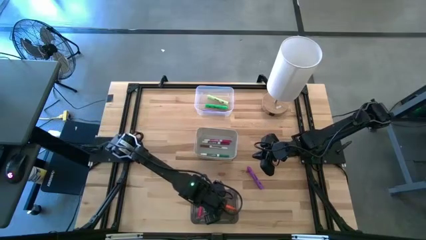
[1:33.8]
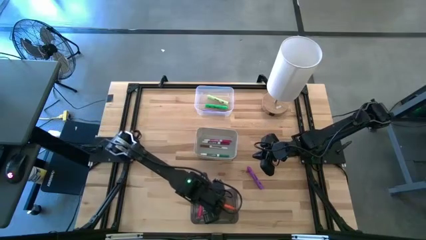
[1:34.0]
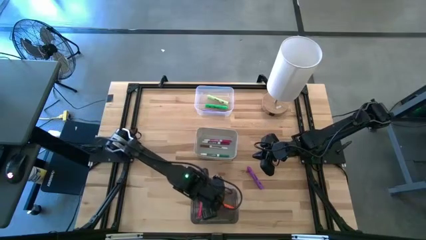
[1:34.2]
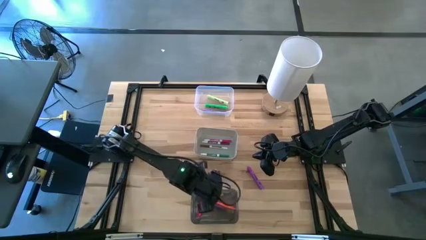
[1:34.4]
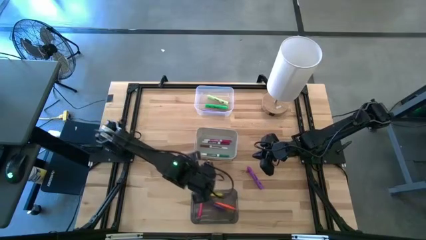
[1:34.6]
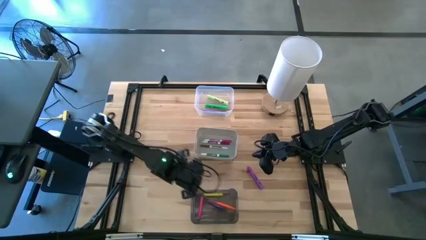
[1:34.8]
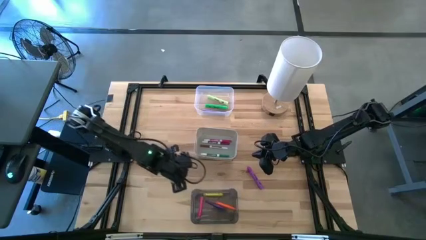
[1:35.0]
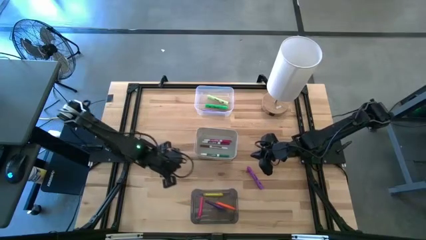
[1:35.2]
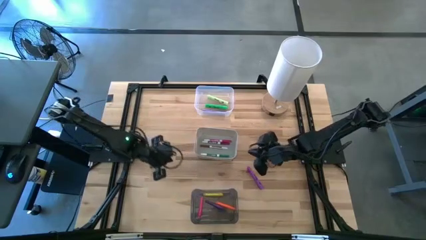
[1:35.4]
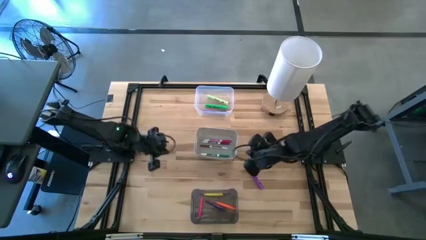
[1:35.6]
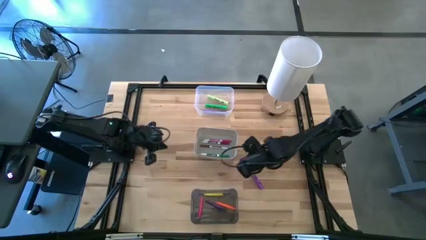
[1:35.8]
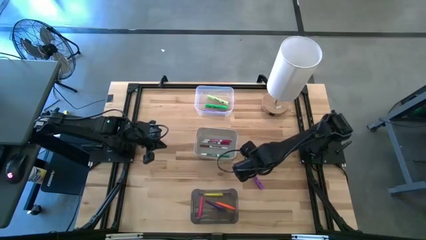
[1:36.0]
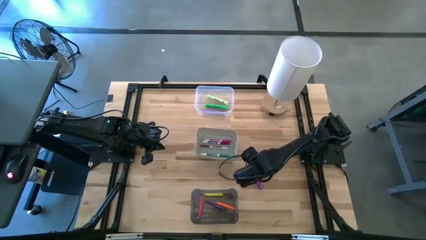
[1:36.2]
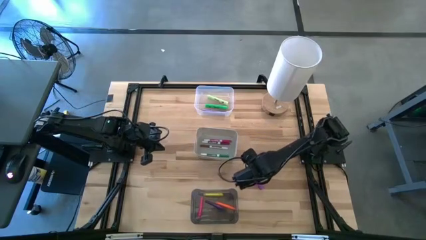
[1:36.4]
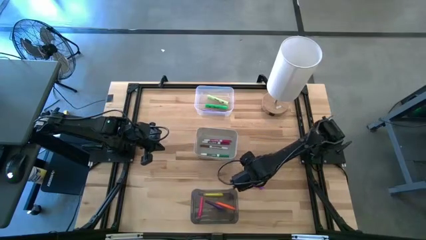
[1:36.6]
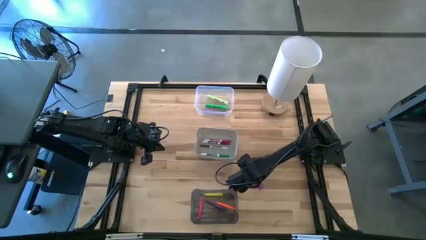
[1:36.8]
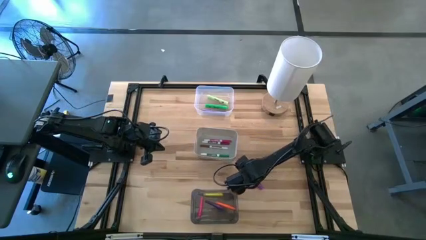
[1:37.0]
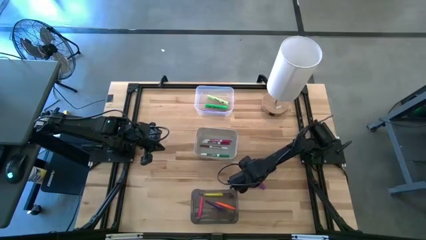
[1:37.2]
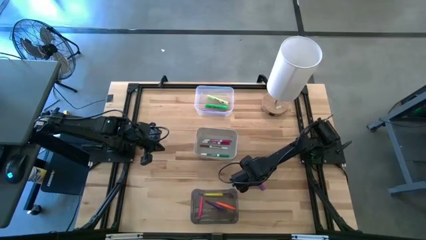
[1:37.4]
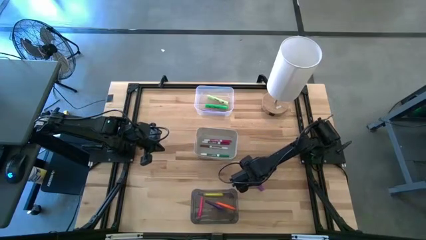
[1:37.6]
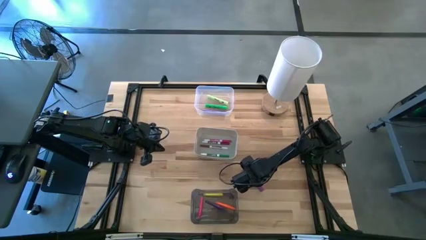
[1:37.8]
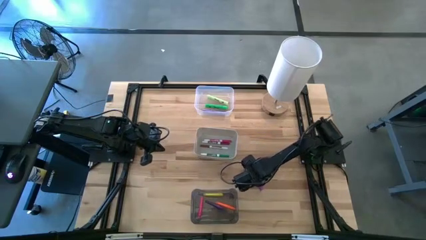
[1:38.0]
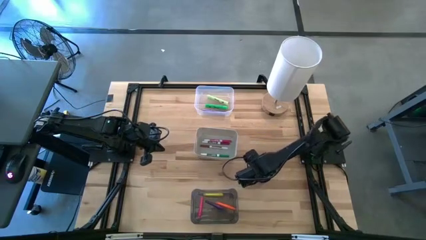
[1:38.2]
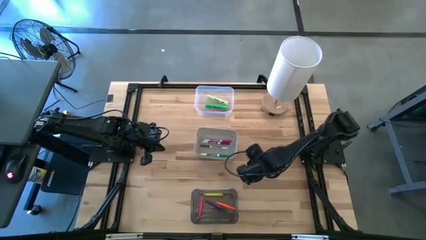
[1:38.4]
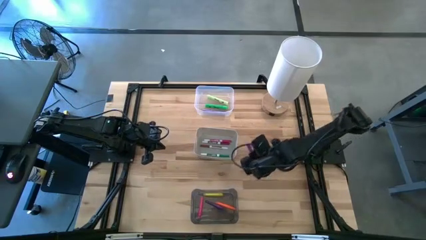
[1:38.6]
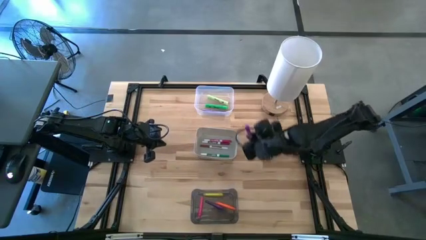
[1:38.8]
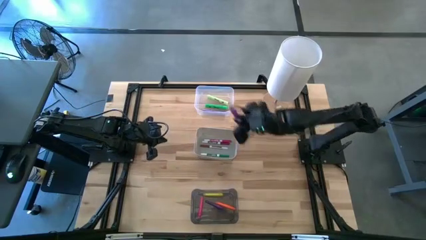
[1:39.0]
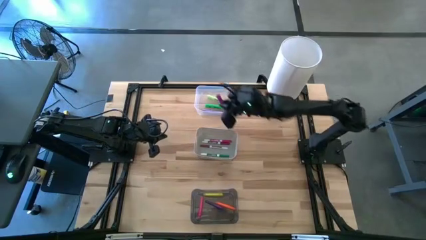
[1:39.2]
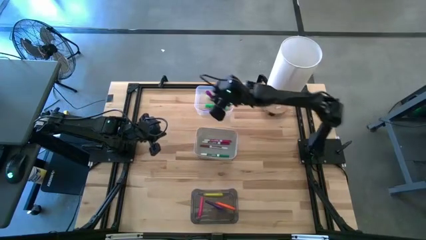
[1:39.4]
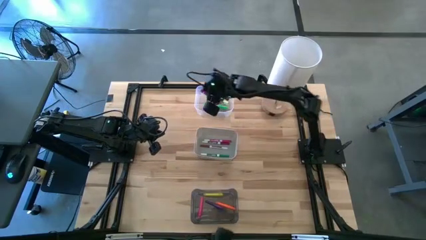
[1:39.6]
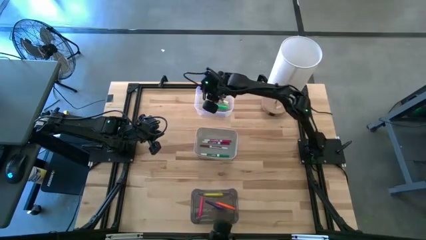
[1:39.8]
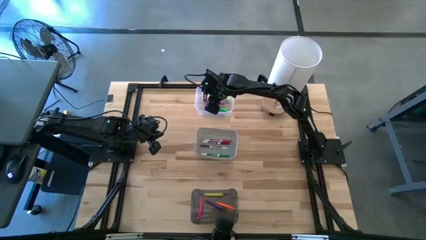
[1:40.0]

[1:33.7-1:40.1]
Task: Pick & Place Markers
Put the violet highlighter into the transparent bin

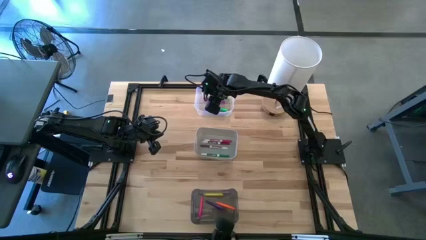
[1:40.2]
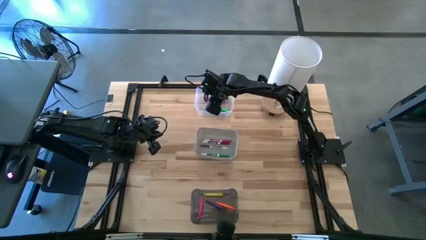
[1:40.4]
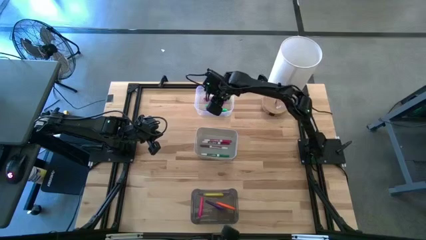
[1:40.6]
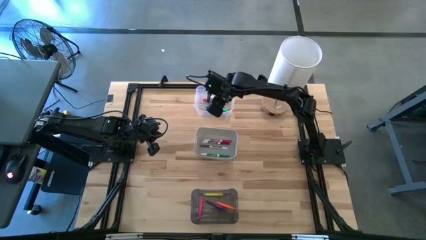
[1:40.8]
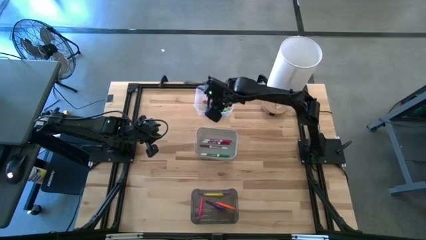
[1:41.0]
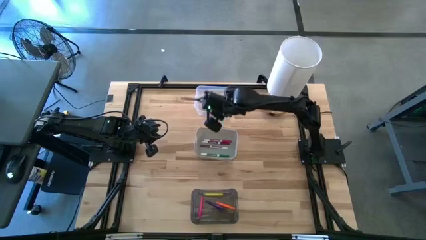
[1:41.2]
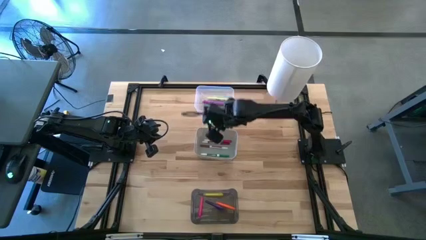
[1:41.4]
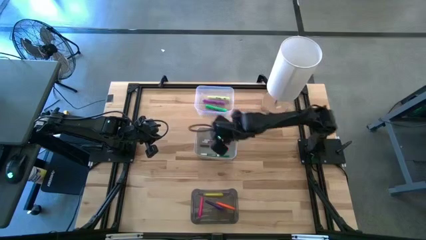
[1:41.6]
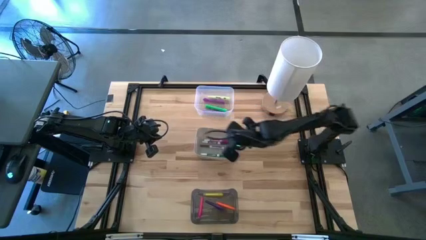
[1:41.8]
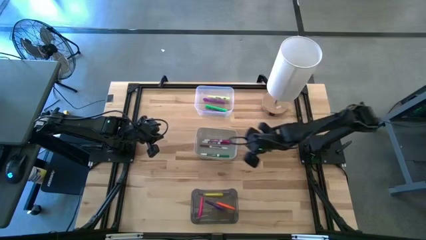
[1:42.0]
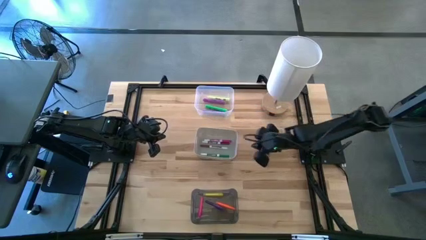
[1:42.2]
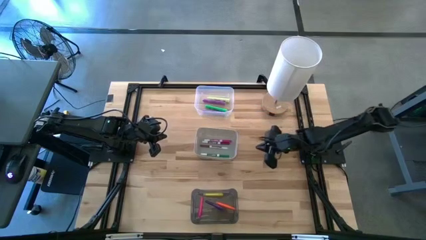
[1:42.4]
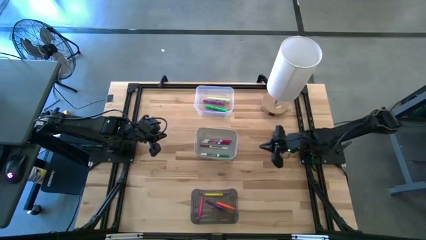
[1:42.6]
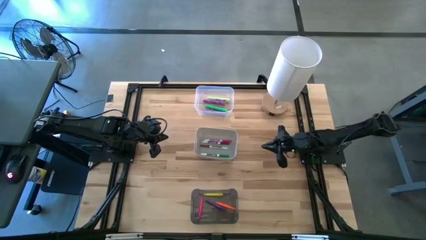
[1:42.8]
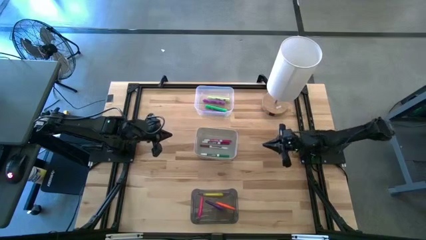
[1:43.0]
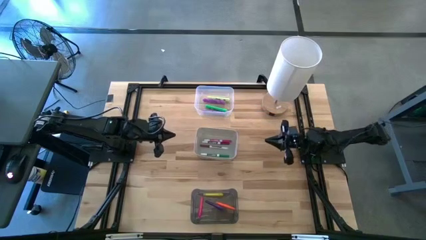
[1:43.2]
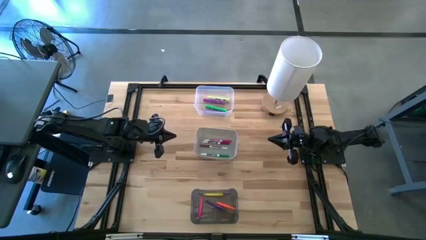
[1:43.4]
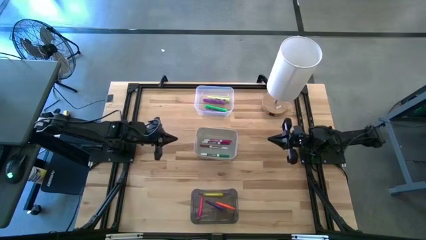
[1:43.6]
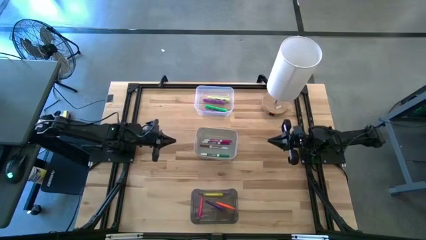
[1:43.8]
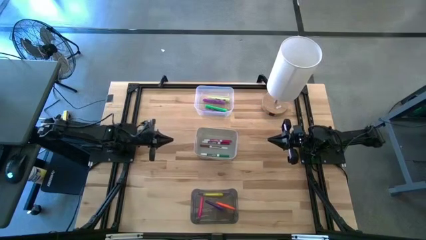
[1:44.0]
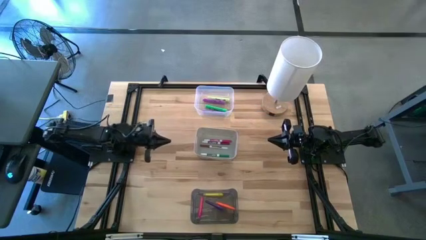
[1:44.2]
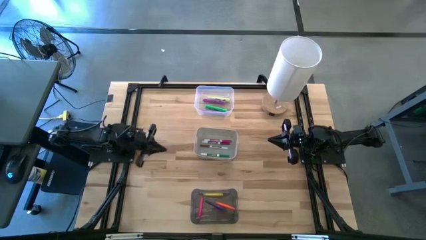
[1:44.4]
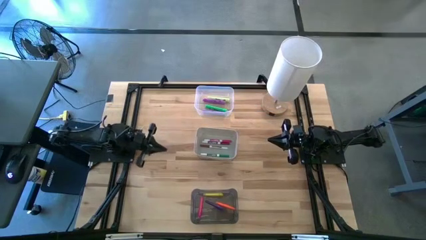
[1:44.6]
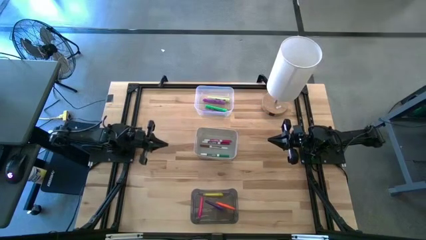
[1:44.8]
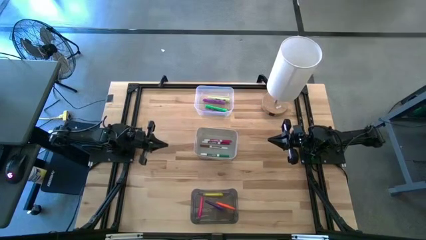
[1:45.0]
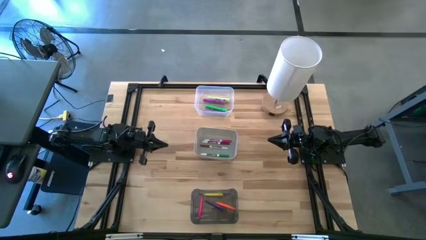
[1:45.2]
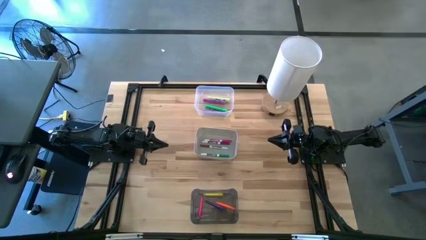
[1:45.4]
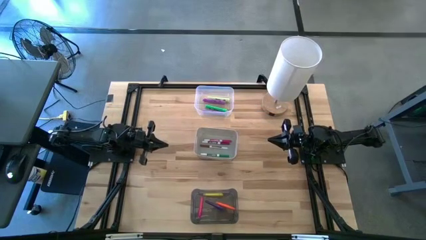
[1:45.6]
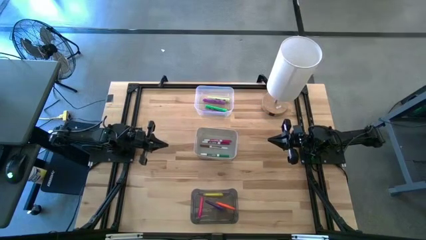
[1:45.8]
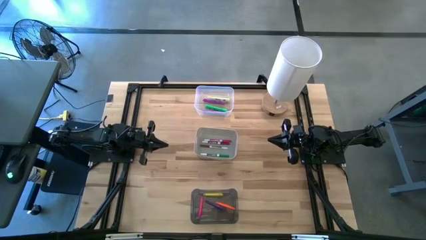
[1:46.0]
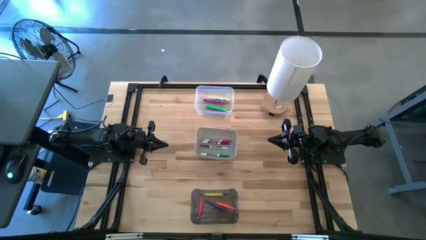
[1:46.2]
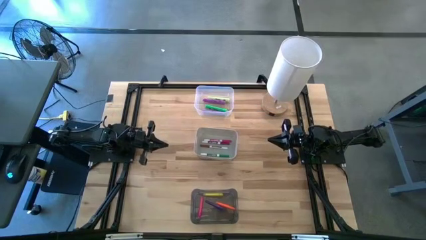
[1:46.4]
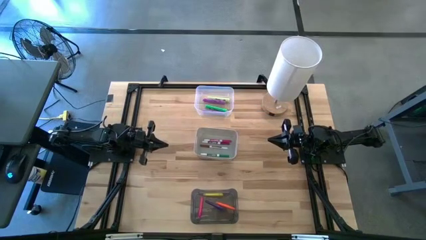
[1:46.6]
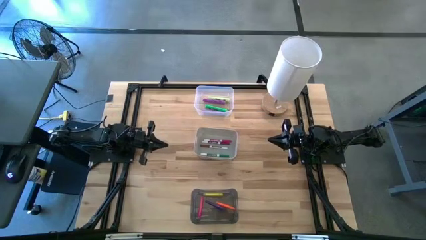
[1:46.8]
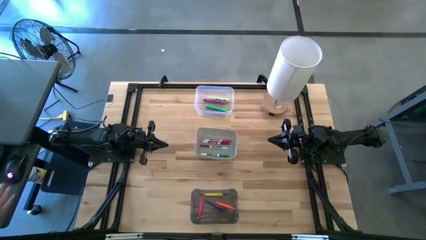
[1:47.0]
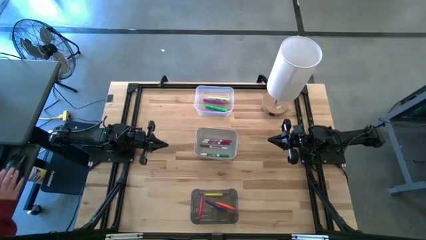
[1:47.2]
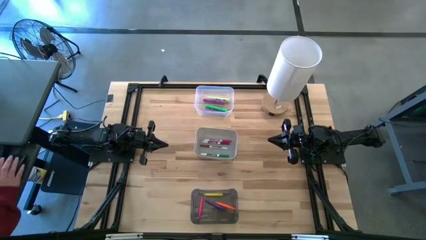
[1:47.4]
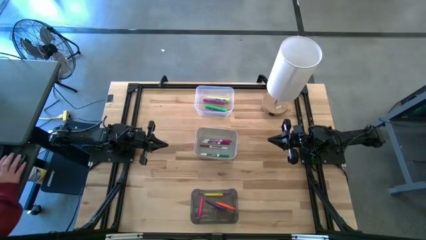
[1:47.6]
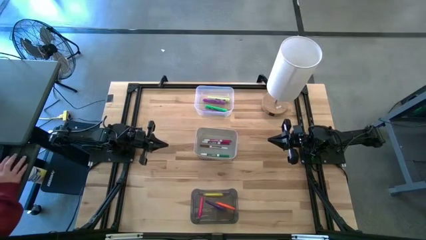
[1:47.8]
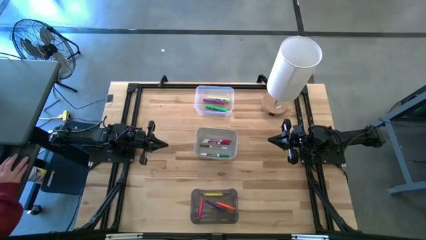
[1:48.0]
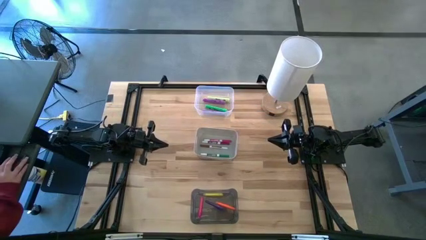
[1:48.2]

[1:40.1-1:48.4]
Return to Home Position

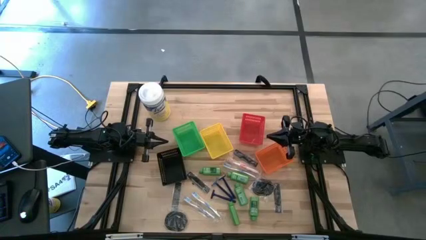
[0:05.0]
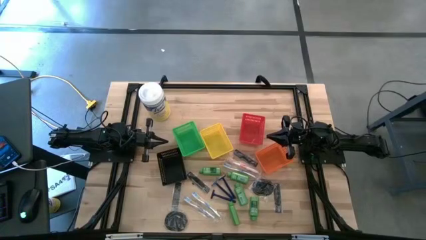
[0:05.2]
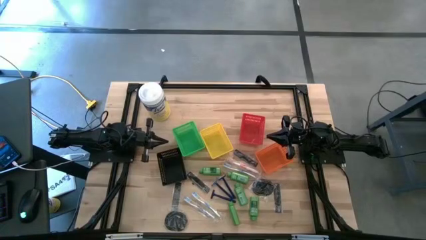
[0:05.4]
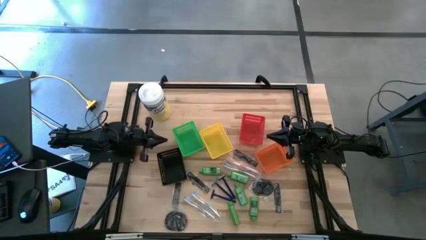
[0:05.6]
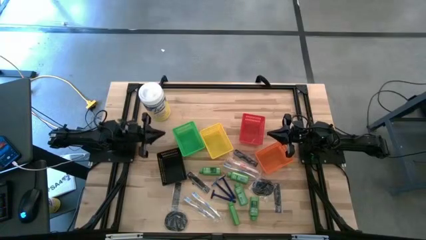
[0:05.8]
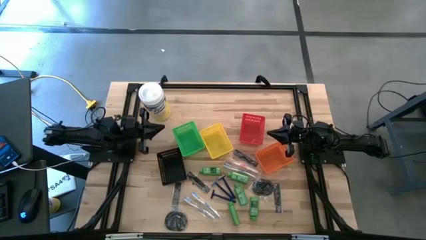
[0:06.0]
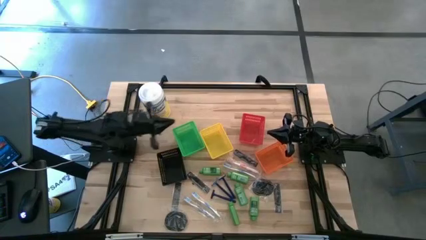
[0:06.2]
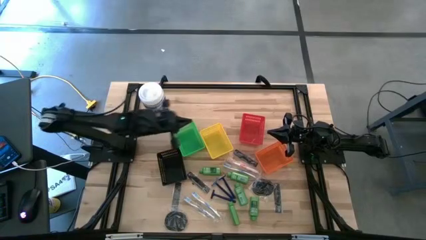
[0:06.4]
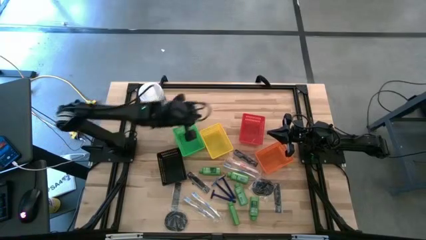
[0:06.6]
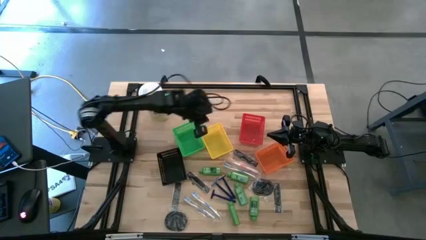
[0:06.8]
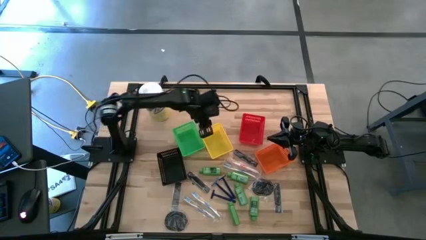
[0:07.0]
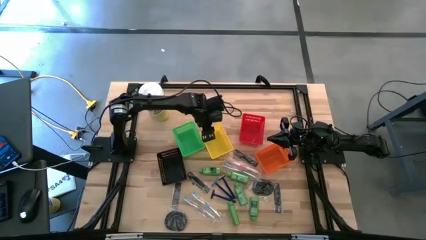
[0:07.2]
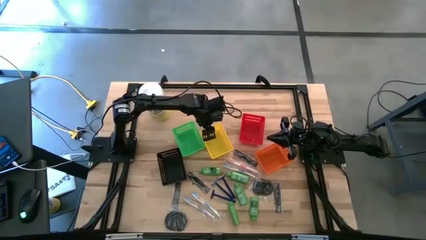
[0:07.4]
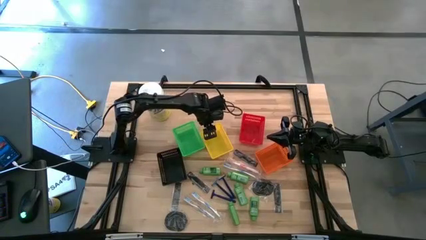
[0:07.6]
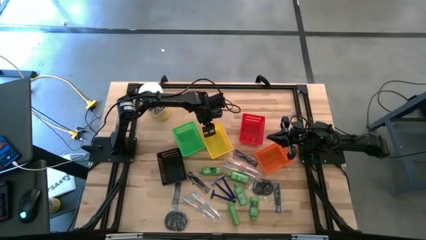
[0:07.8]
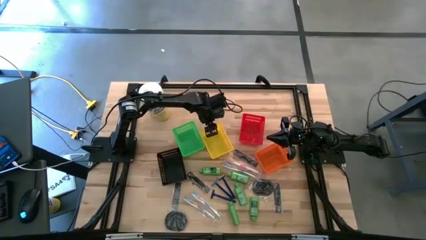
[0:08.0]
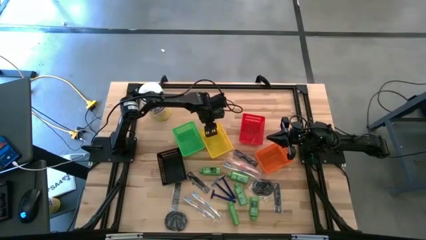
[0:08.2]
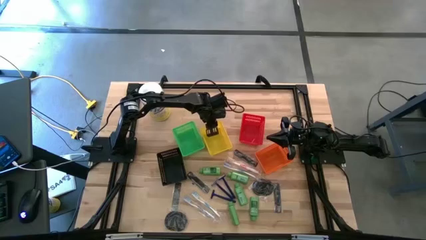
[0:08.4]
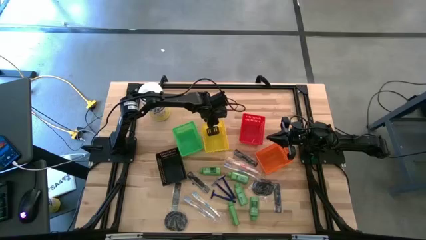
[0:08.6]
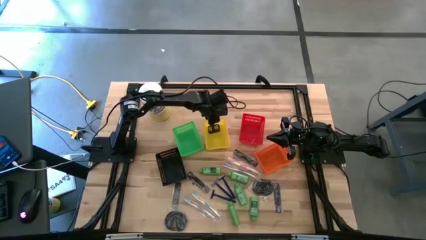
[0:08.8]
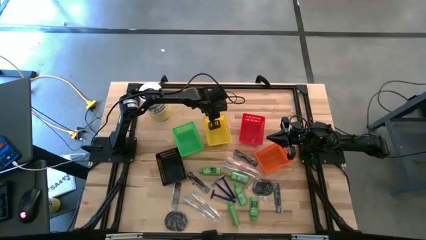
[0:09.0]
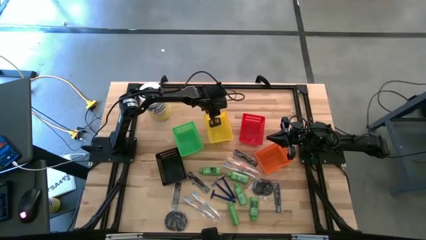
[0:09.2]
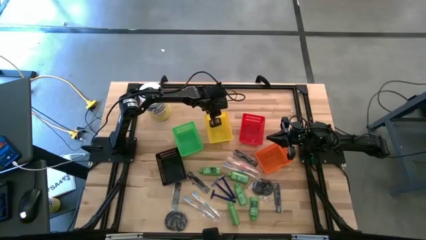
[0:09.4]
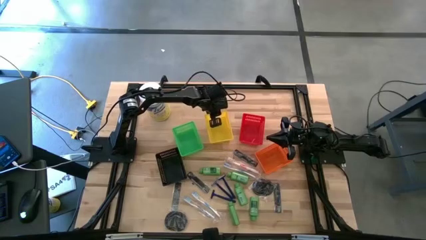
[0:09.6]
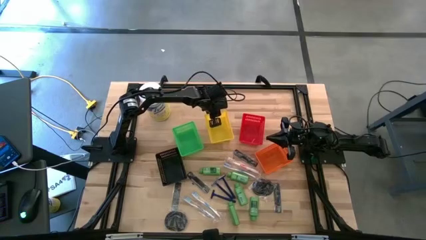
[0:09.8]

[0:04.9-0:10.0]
Task: Pick & Place Travel size toiletries
Adjust the yellow bin
